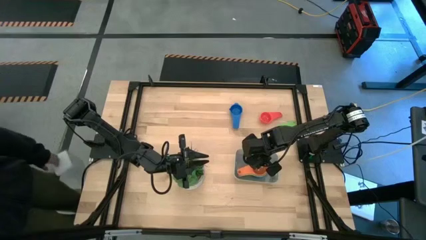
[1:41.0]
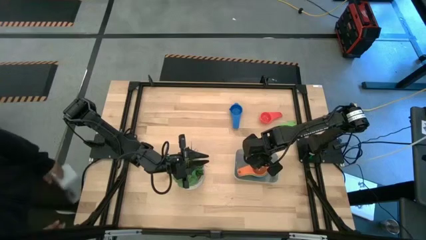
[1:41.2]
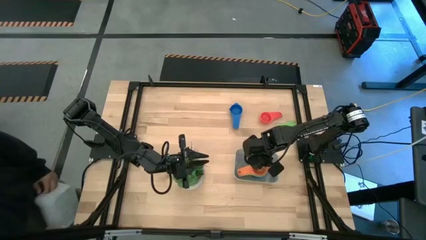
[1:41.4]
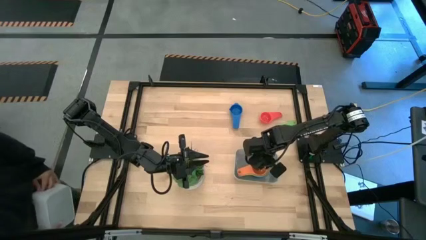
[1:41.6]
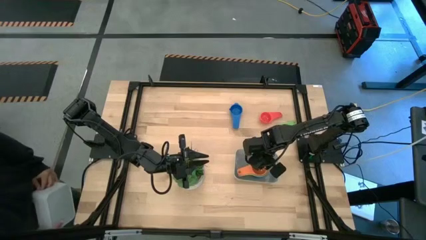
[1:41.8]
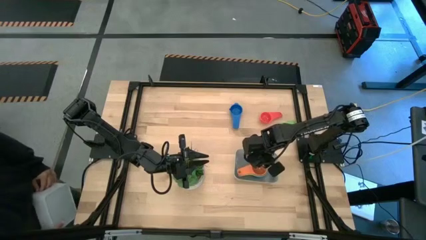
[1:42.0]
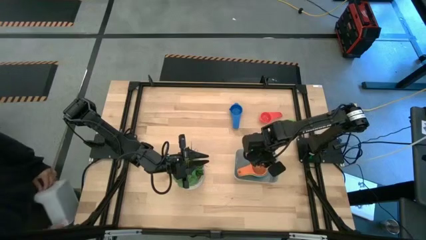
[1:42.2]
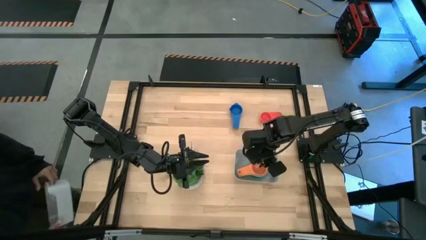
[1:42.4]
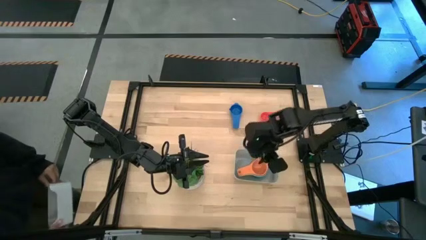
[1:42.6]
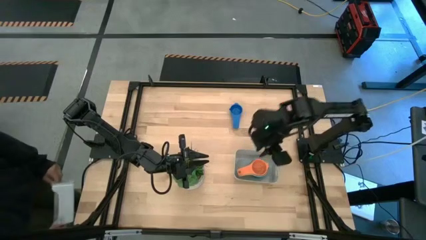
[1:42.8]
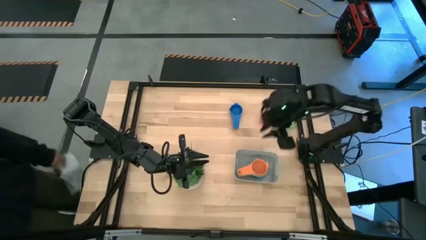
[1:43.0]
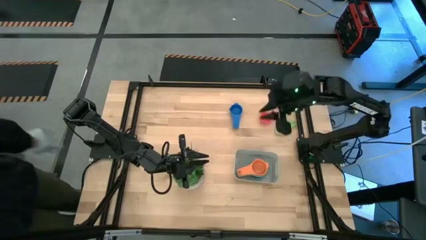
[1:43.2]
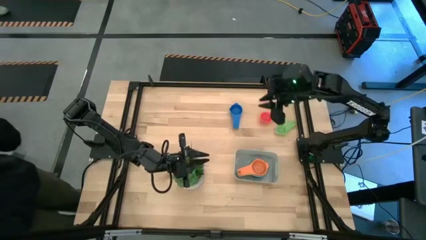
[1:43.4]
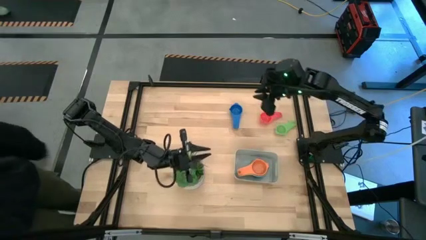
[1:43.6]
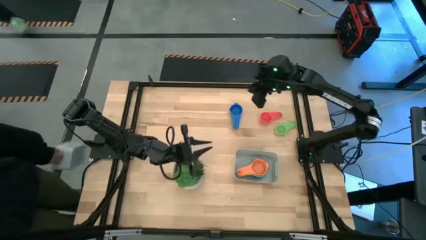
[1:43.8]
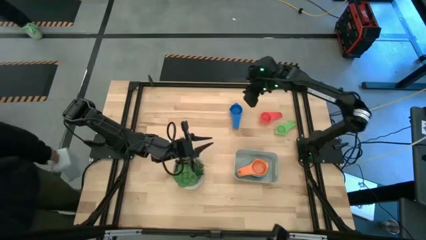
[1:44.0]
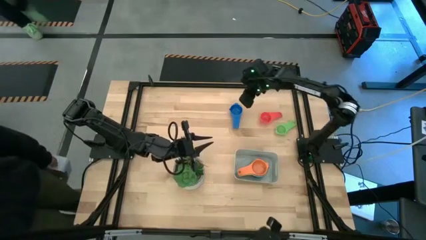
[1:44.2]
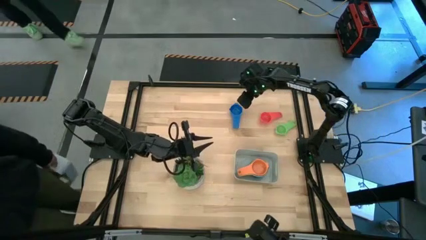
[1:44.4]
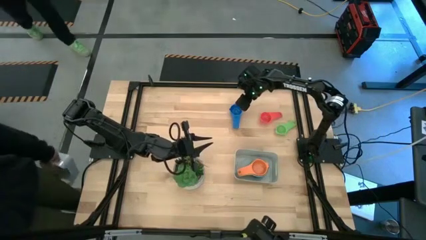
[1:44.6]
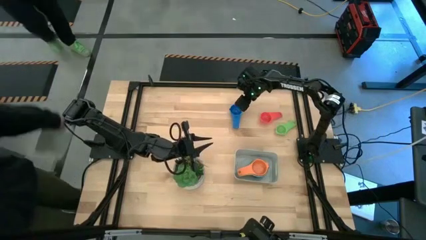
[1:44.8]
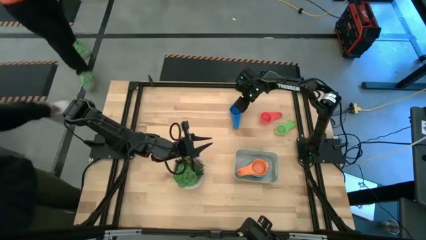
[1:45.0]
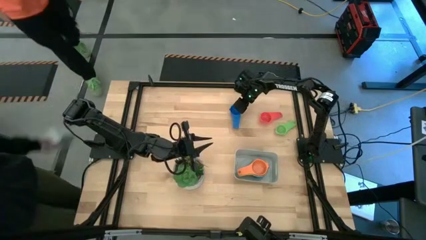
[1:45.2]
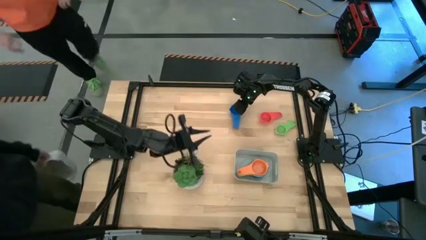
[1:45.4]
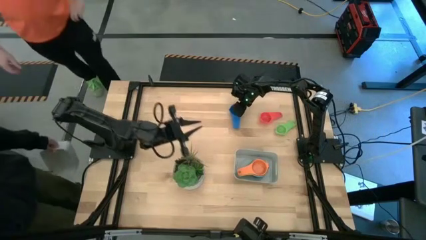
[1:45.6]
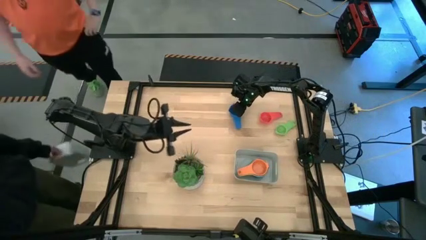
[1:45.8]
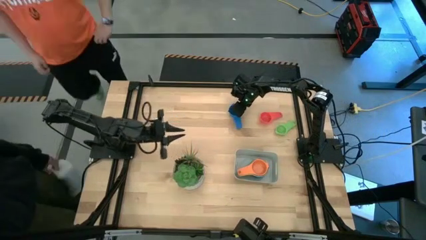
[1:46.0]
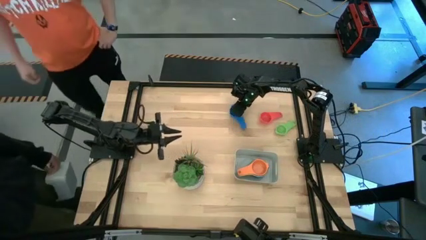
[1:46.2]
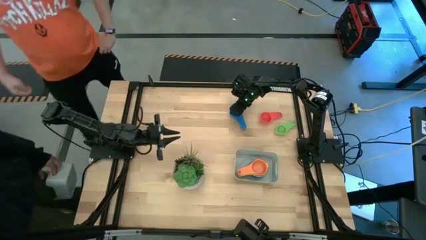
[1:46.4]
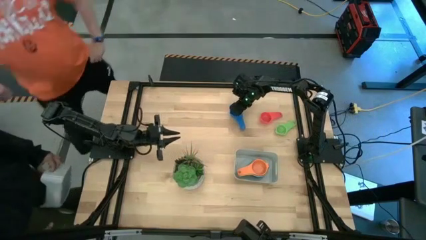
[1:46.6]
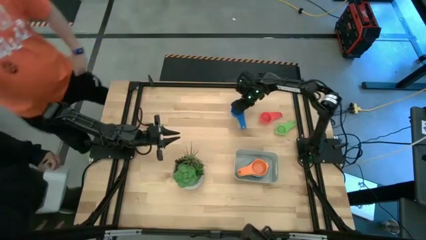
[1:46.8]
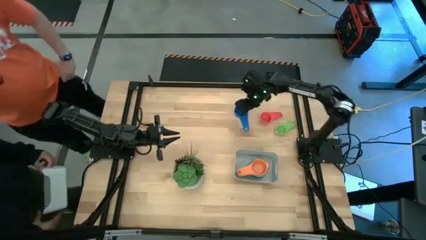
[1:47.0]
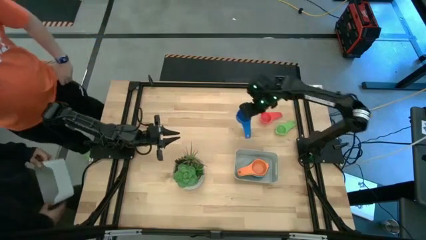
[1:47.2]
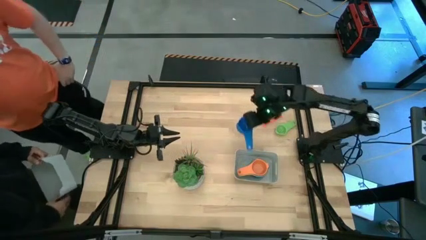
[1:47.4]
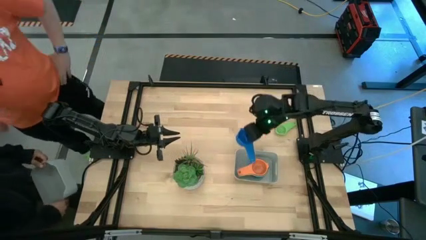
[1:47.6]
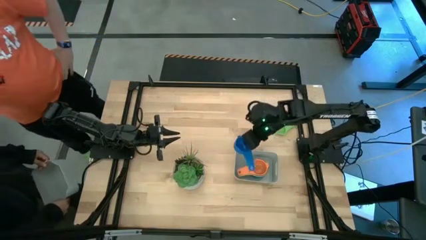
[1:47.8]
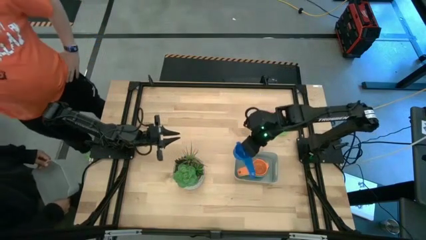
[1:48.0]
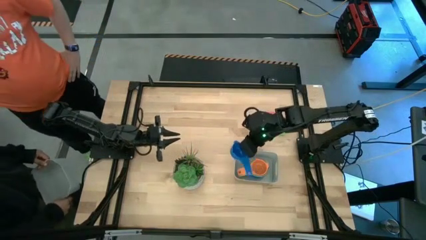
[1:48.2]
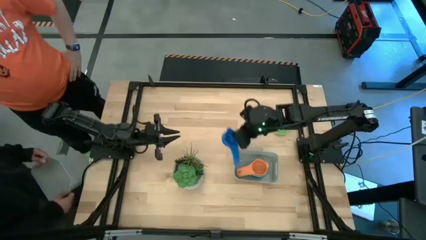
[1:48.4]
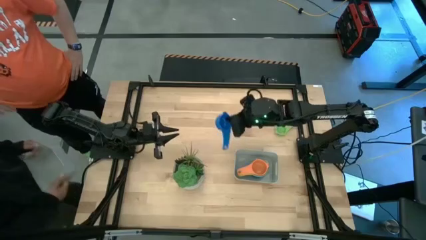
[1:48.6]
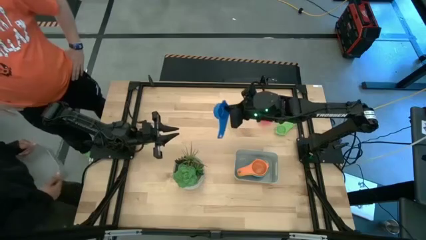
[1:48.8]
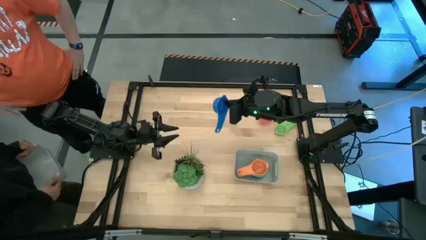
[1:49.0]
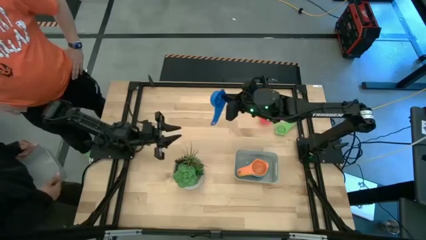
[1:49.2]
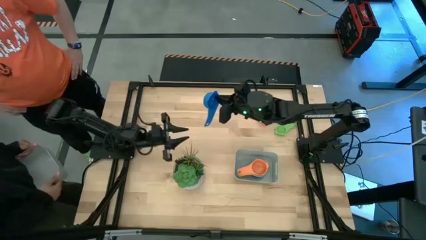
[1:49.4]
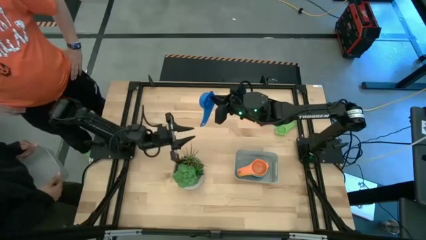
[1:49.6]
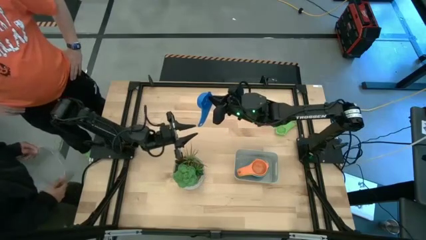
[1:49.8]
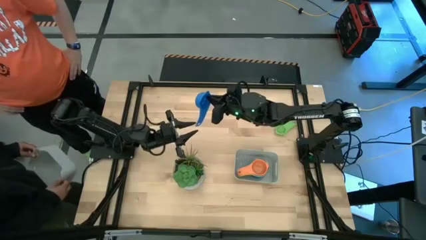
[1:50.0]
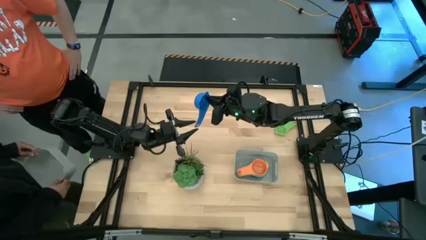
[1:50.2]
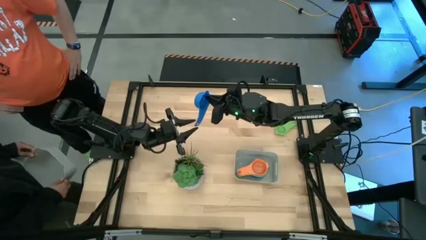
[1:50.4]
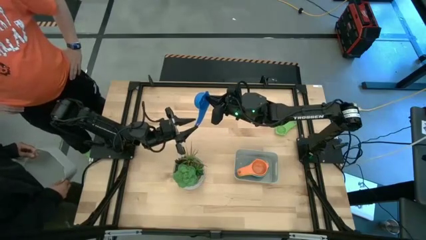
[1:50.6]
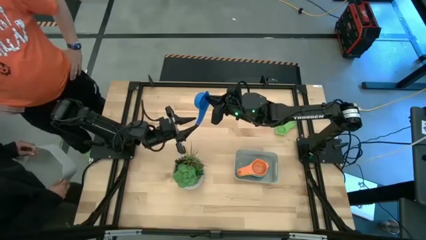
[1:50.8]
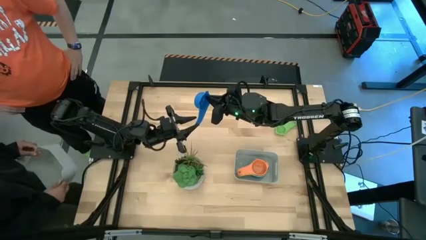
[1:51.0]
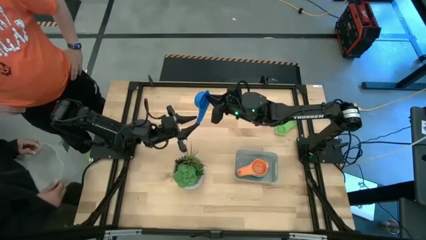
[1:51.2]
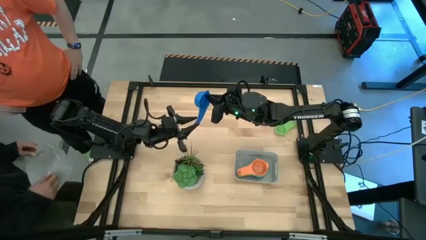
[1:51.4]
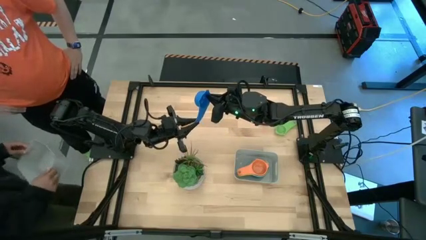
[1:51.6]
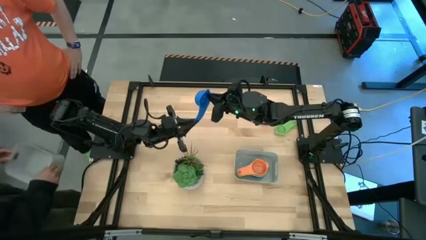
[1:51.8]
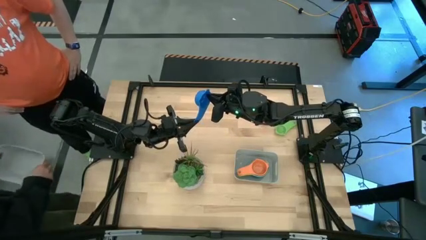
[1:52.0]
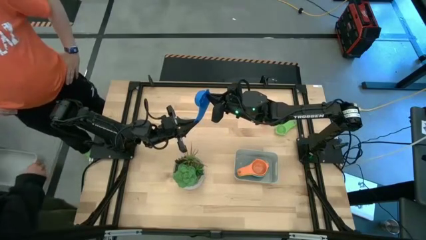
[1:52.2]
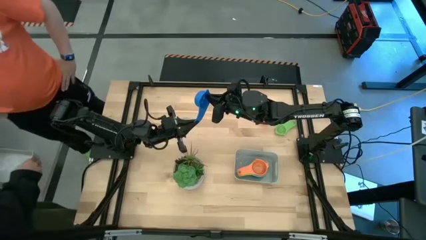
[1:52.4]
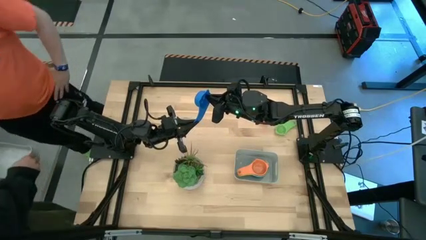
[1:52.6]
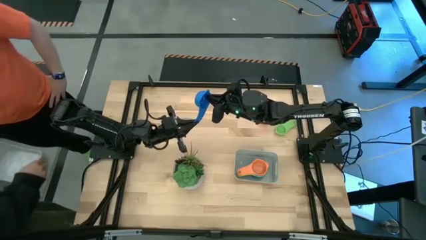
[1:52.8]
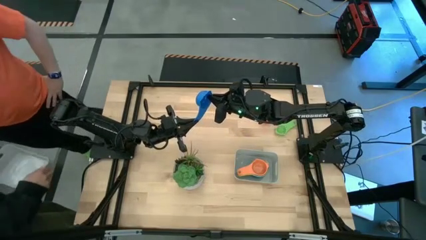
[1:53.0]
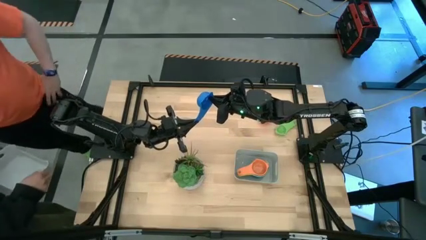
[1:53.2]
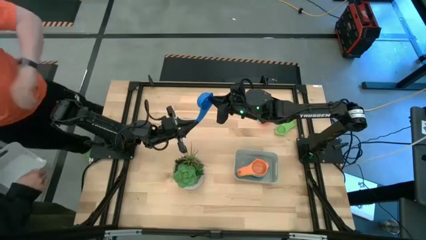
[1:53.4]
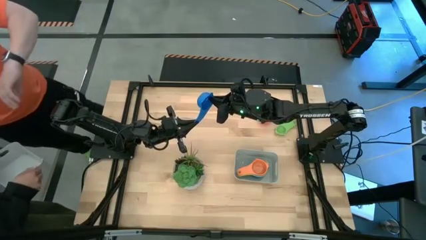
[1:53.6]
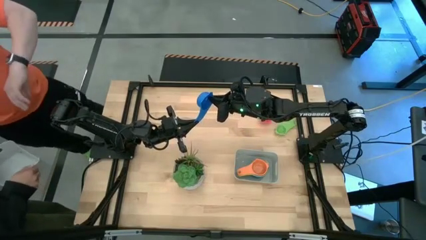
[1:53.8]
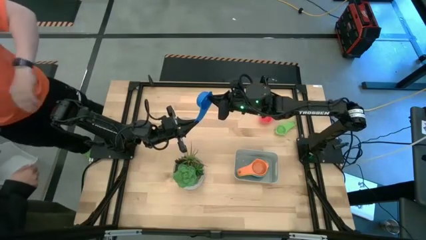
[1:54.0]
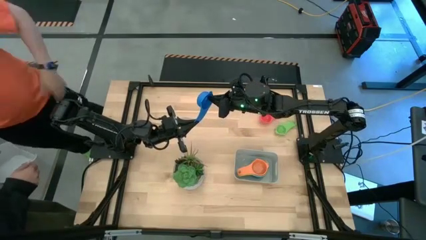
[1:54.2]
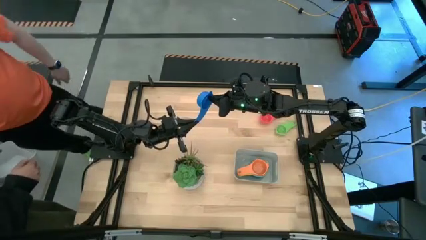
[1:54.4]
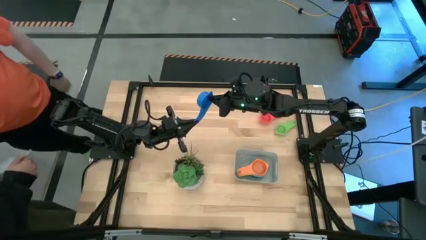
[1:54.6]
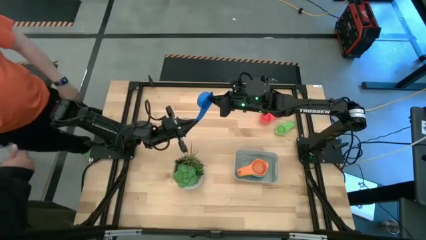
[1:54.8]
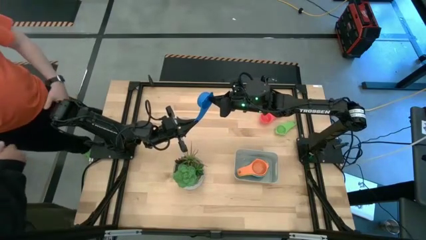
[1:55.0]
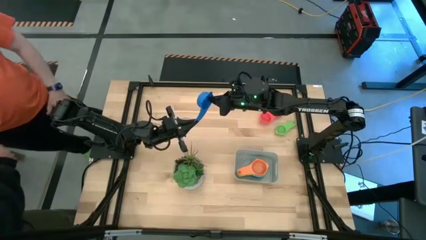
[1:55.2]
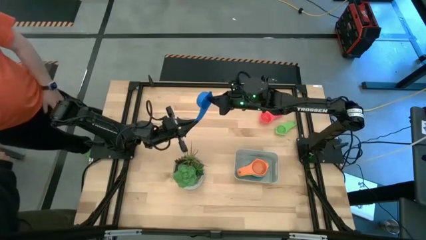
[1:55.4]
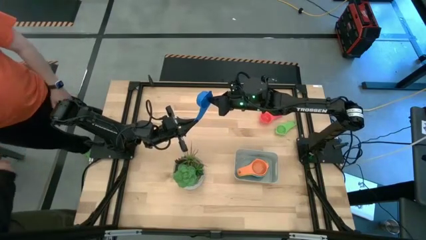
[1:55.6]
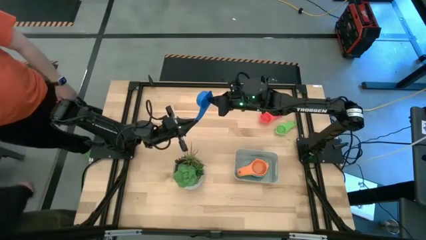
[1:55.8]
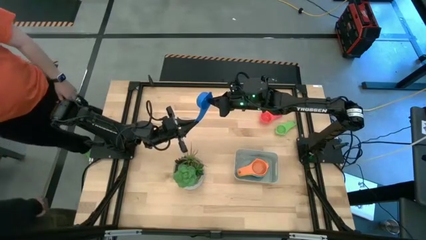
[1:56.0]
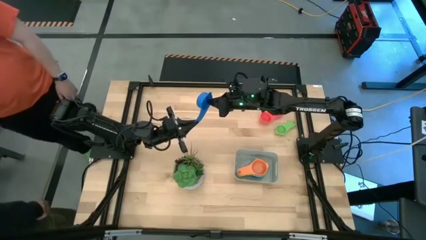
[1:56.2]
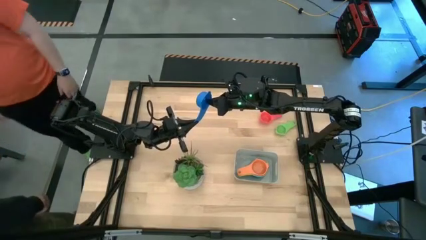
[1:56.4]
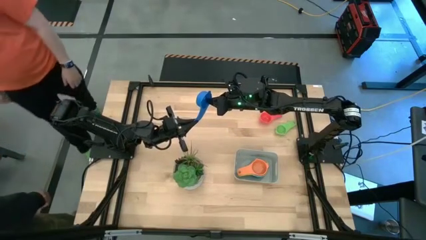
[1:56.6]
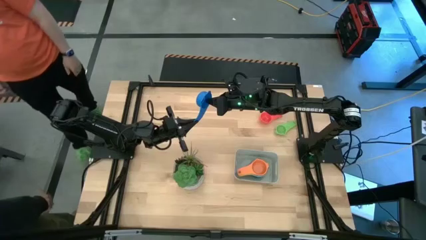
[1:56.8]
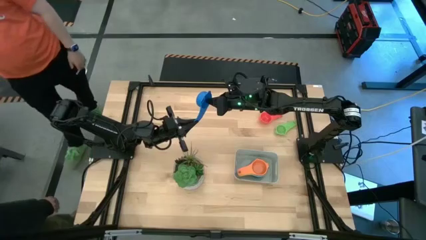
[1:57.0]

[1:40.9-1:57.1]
Task: Nest measuring cups in basket
Stack the blue measuring cup on top of the orange measuring cup in the grey bin
